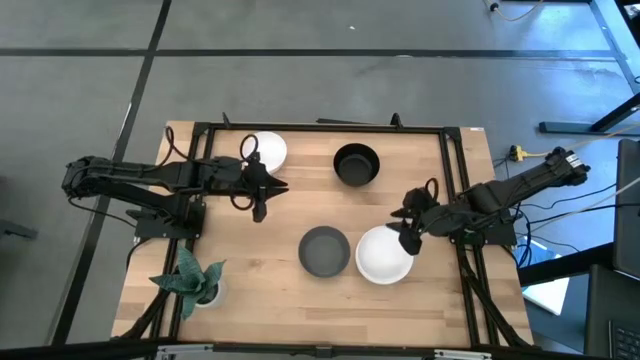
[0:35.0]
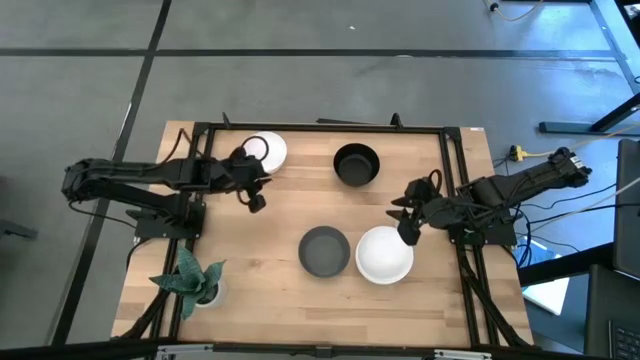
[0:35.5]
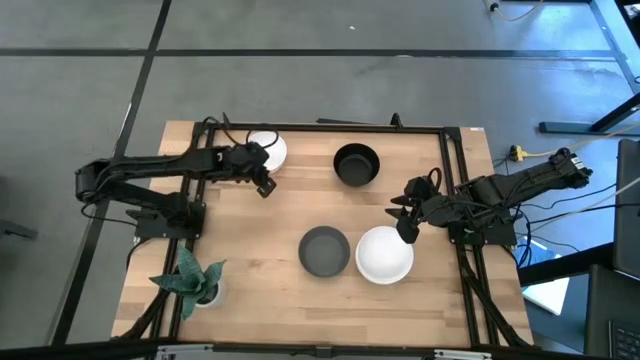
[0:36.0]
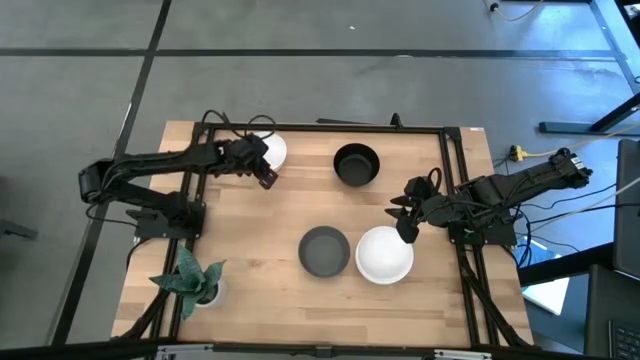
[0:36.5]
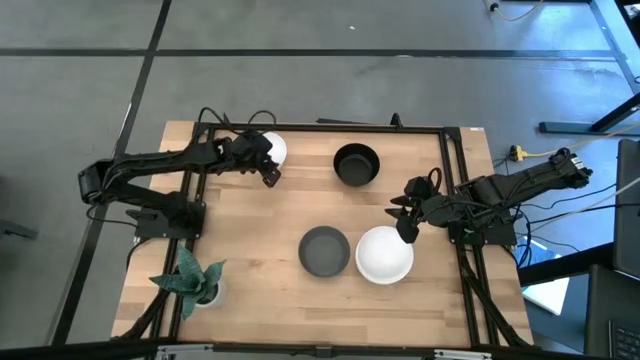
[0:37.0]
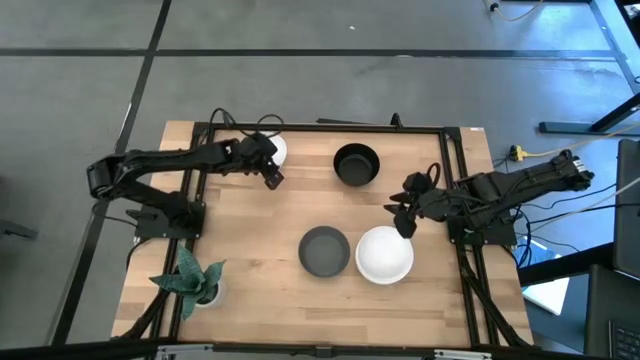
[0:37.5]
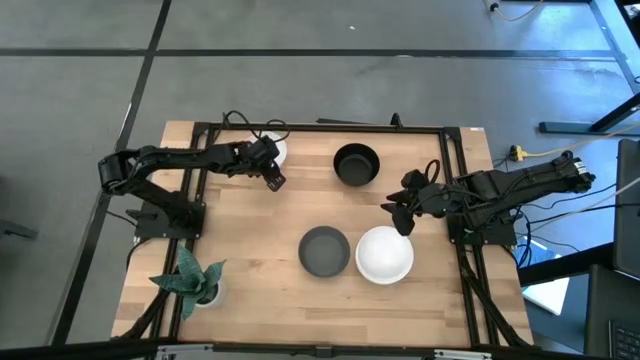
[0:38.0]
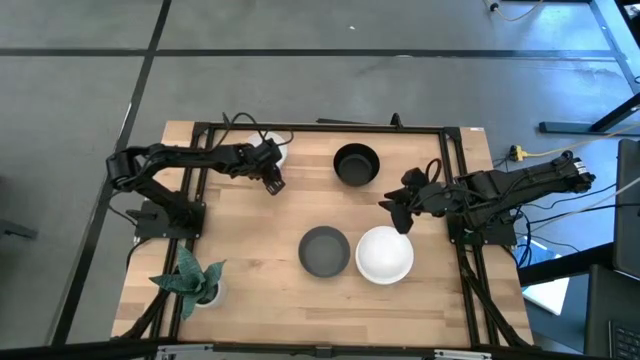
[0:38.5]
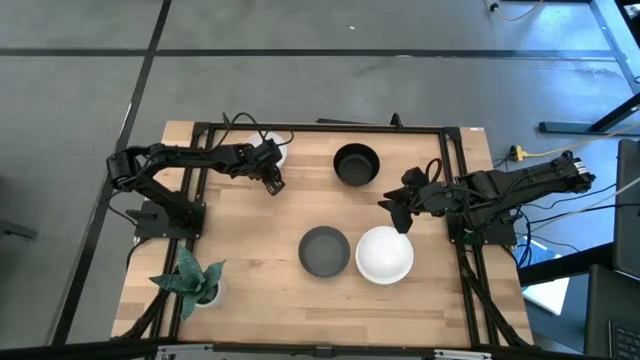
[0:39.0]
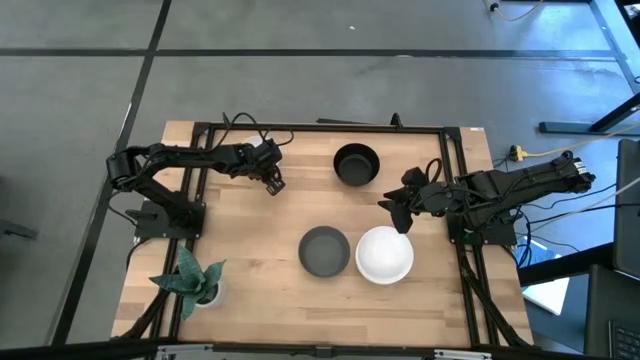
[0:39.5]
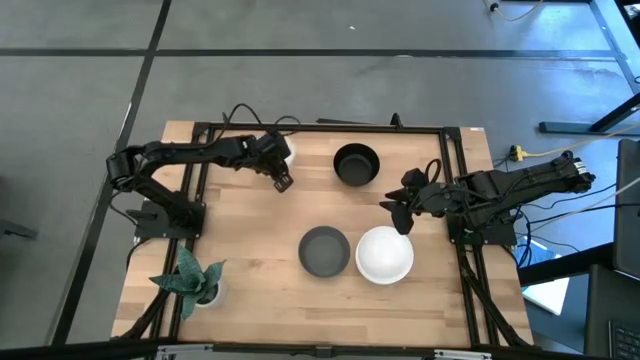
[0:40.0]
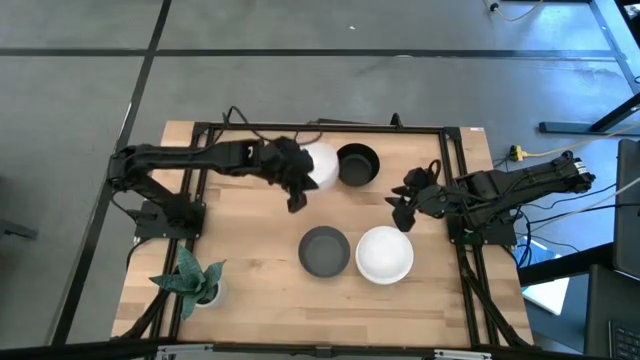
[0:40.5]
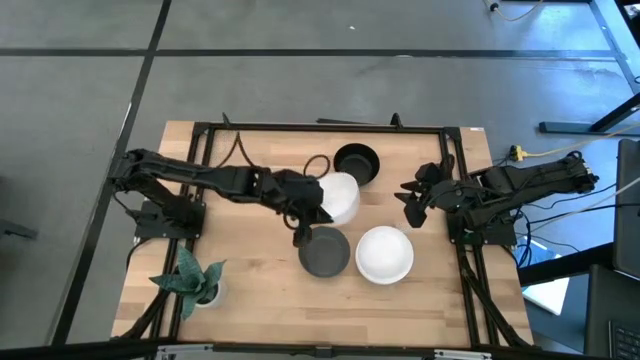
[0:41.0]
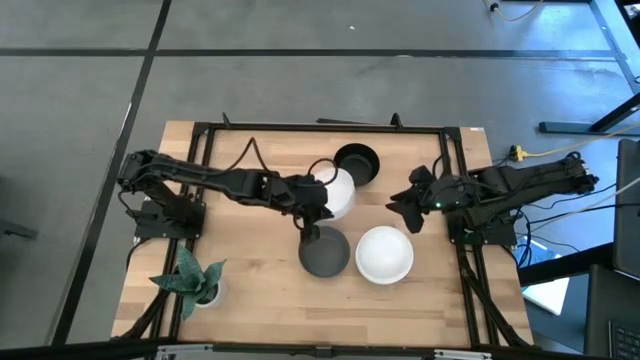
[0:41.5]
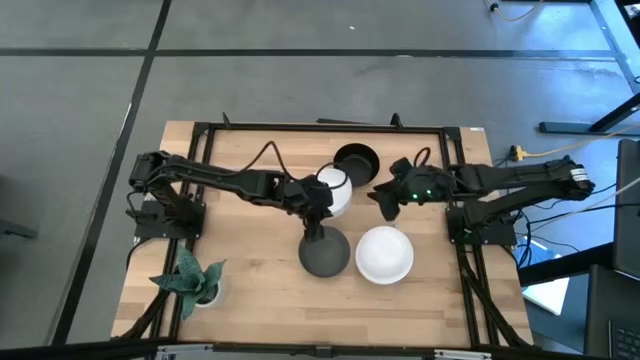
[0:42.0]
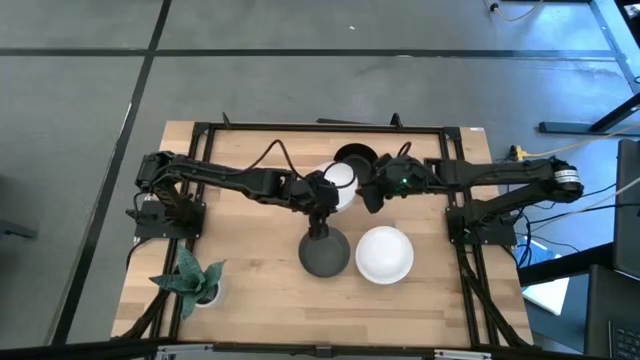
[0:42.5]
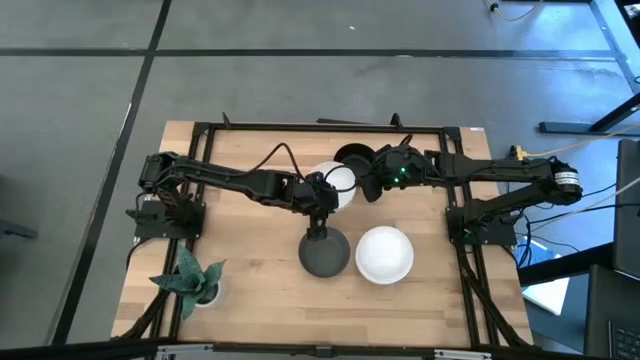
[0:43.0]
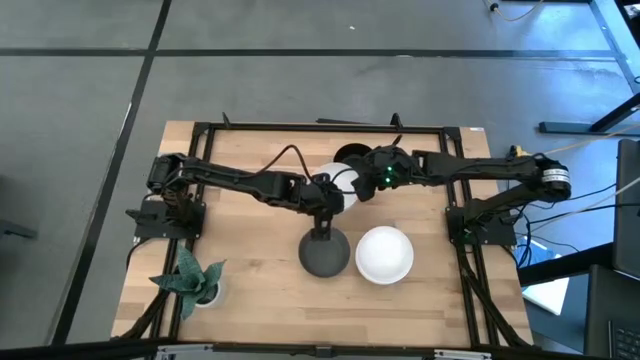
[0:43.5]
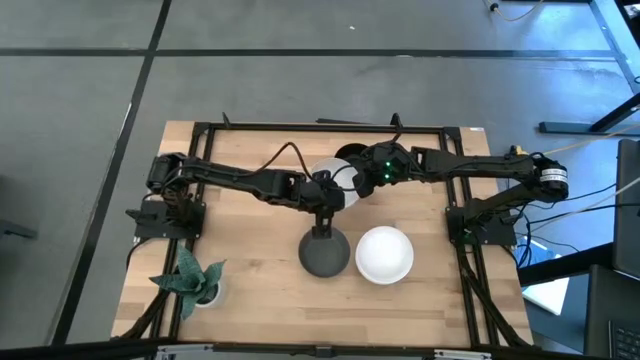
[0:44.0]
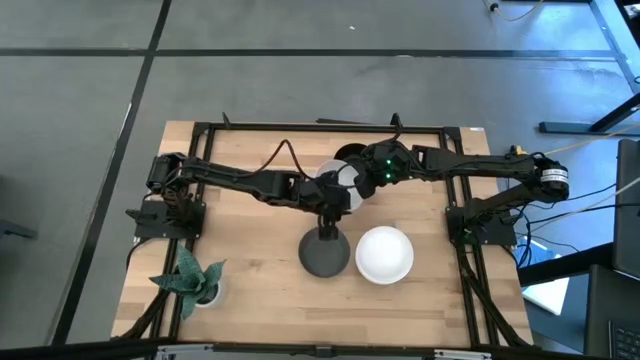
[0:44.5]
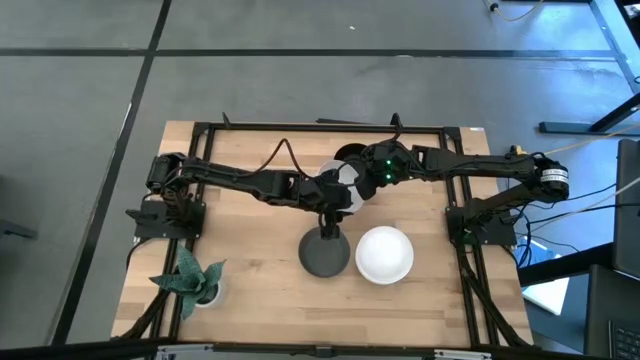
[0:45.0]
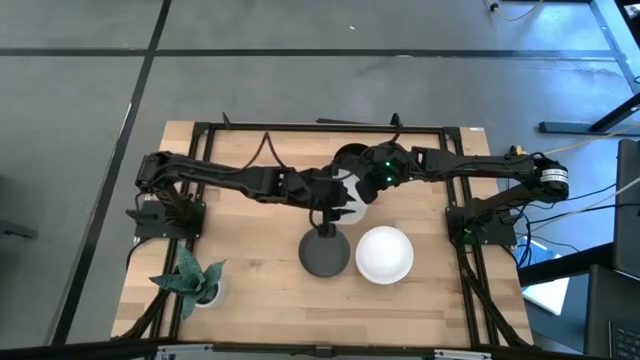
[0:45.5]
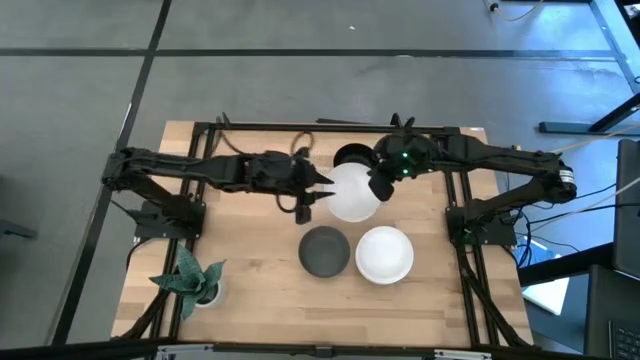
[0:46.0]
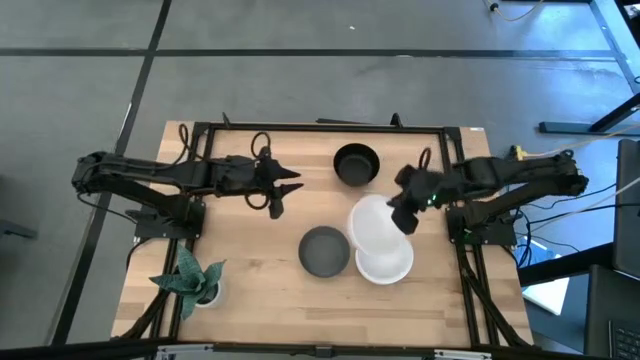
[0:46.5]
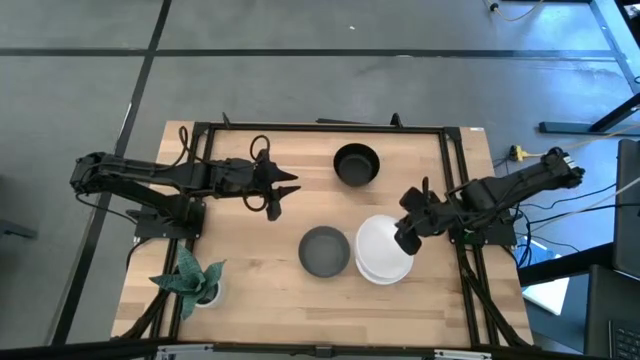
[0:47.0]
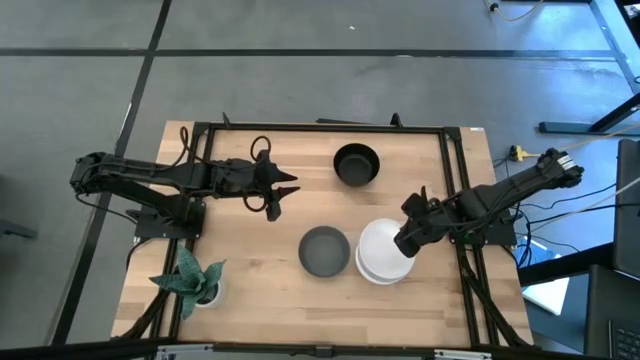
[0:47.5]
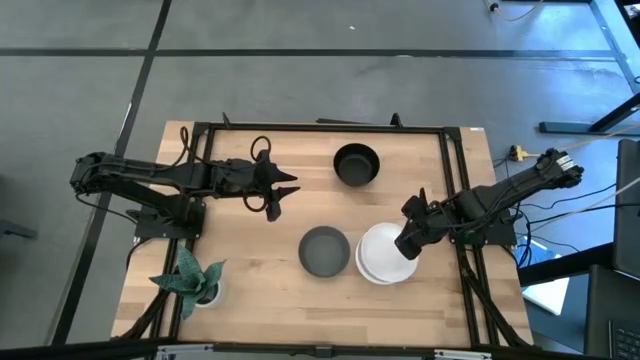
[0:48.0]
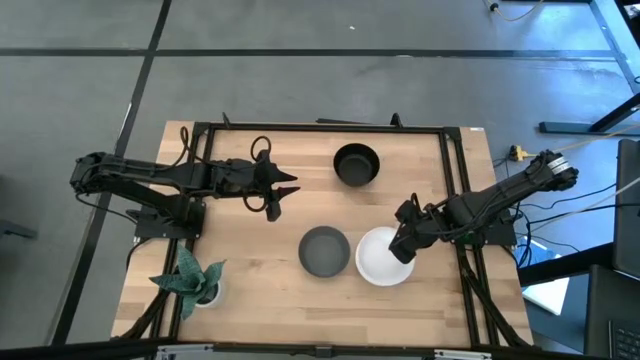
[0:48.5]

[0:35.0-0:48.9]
Task: Nest bowls inside each other
Stack the white bowl on the white bowl

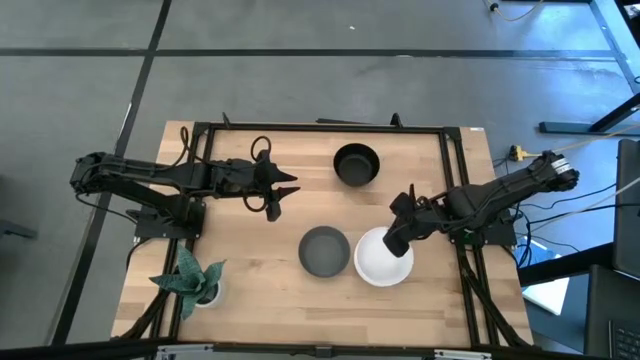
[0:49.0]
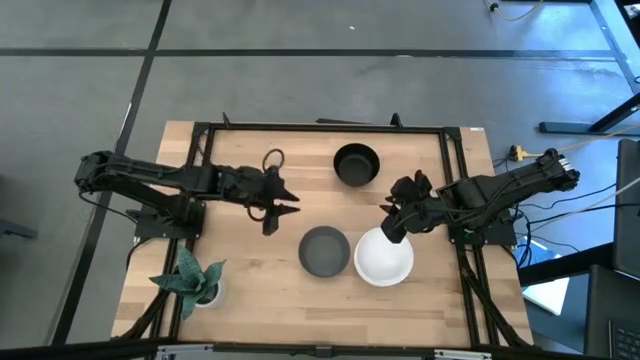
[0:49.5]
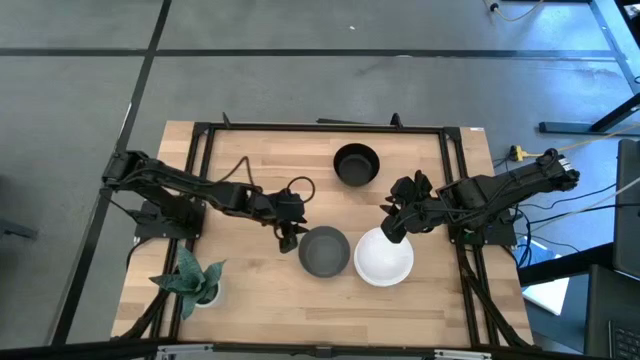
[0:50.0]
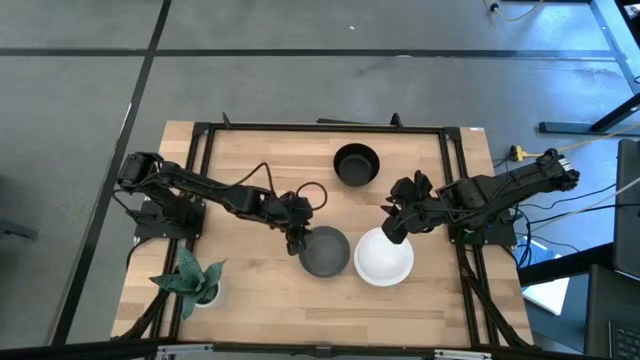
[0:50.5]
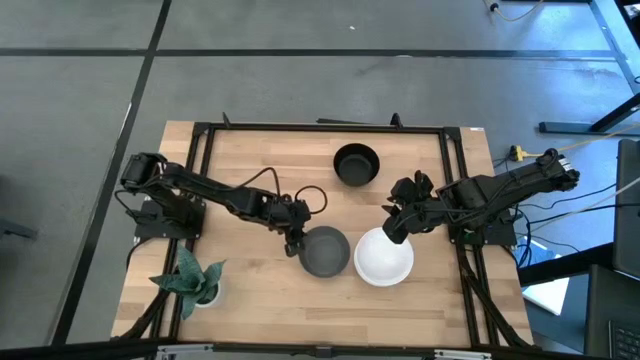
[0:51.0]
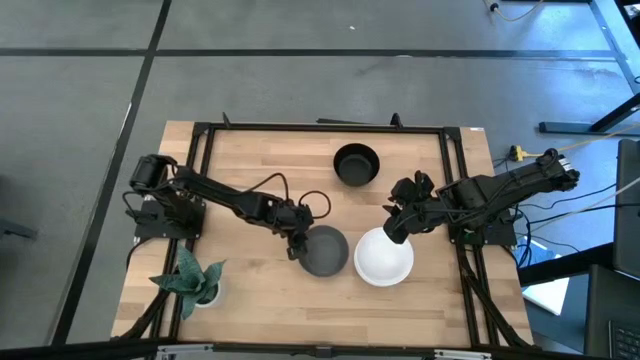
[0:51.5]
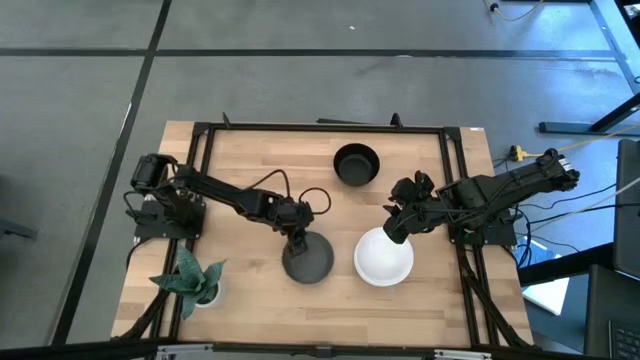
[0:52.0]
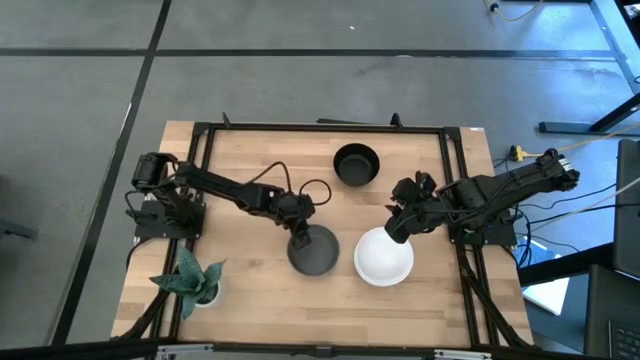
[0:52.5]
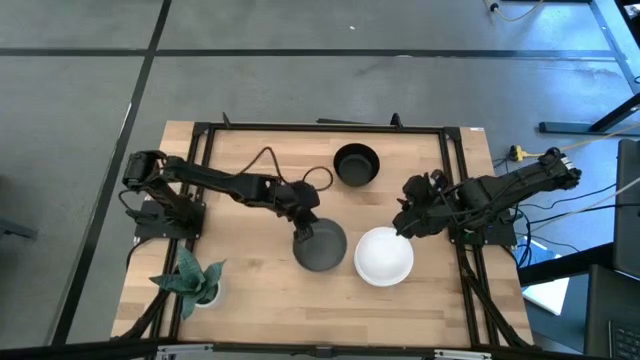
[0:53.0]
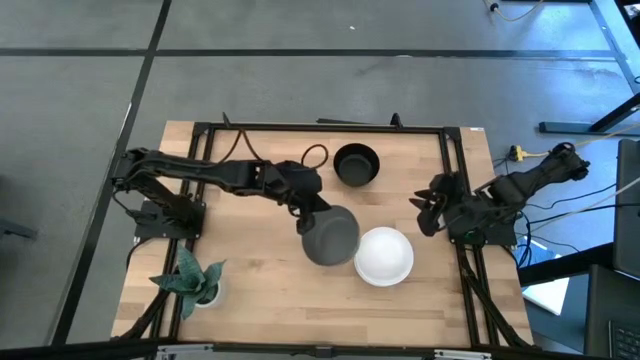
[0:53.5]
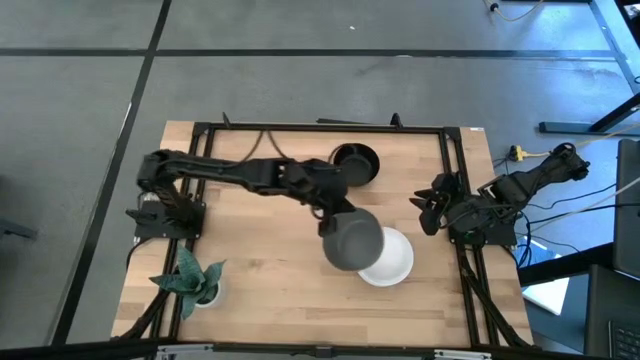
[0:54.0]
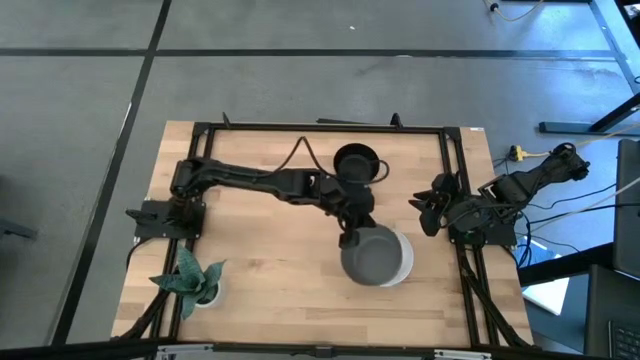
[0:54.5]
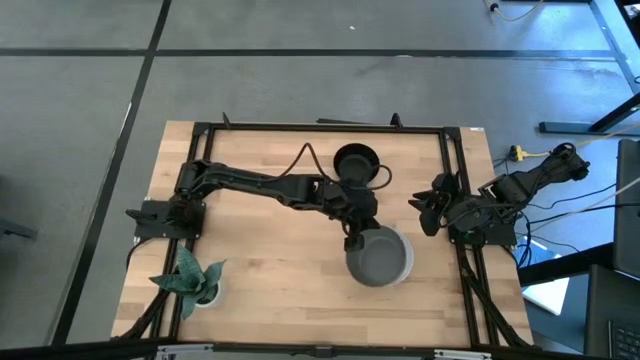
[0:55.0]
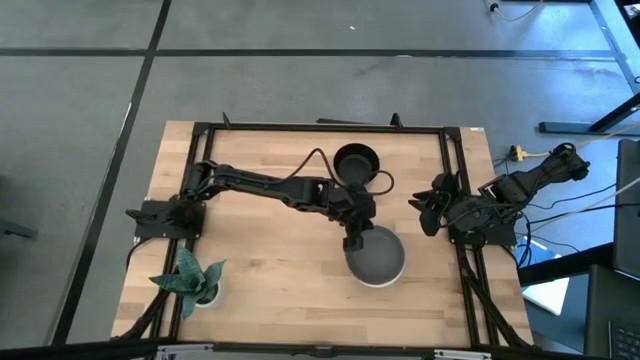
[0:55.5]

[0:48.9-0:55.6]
Stack the gray bowl on the white bowl

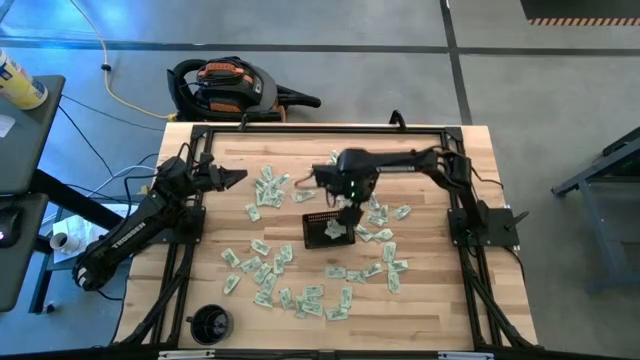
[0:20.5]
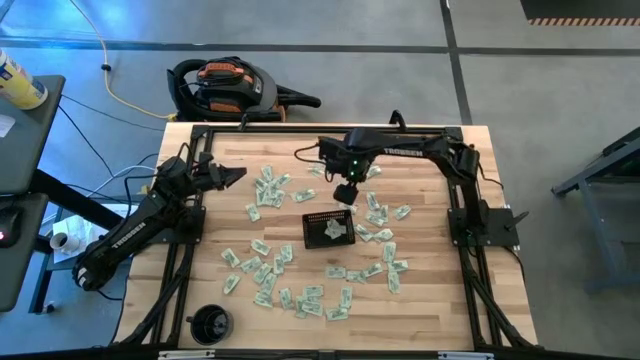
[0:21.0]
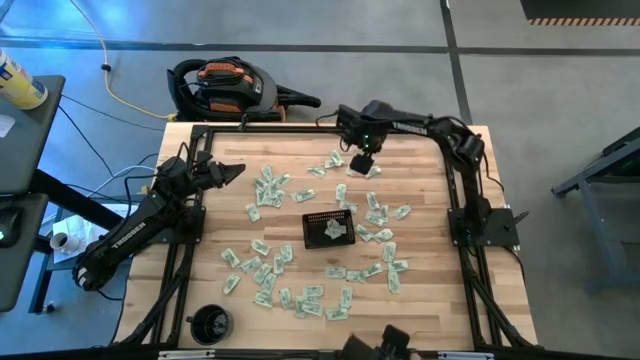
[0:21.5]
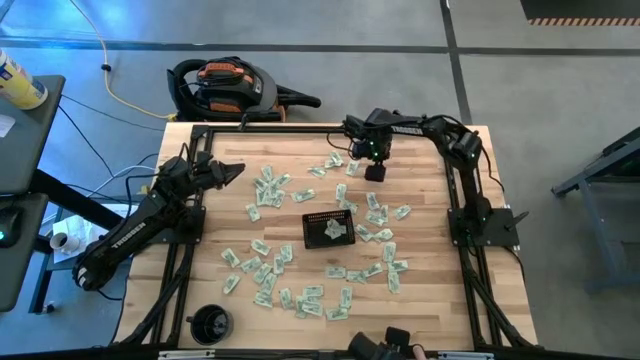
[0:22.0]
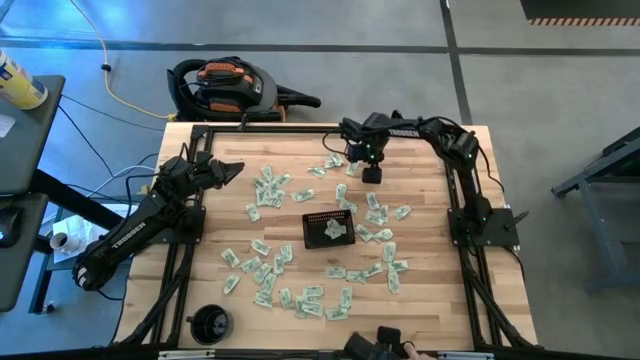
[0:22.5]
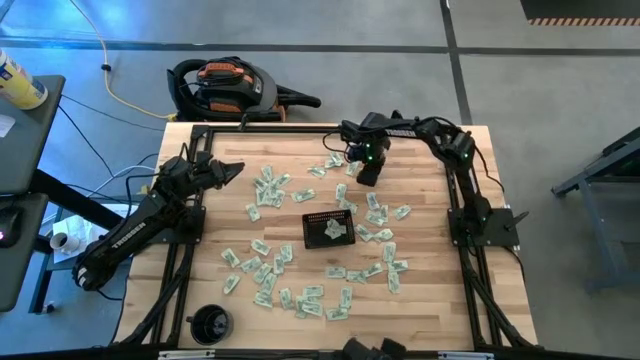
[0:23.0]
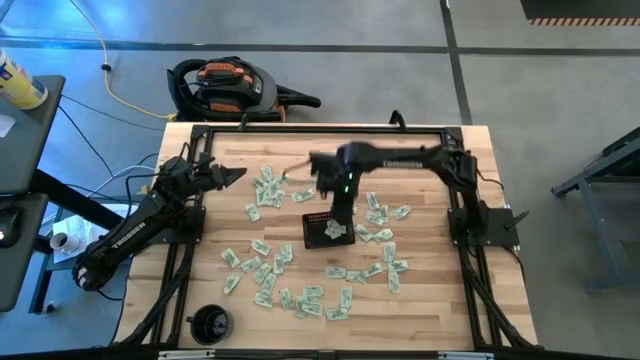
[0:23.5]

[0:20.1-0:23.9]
Task: Pick and place Stevia / Truvia into bins
Put the green stevia packet into the black basket
